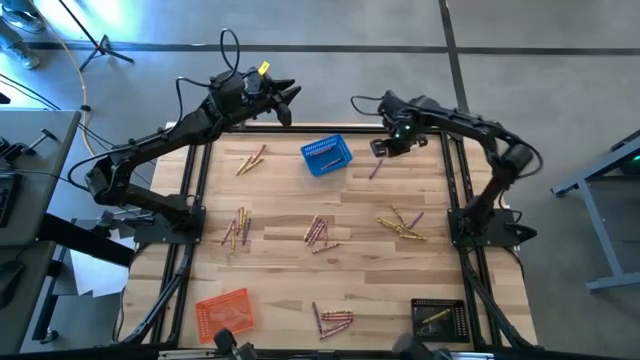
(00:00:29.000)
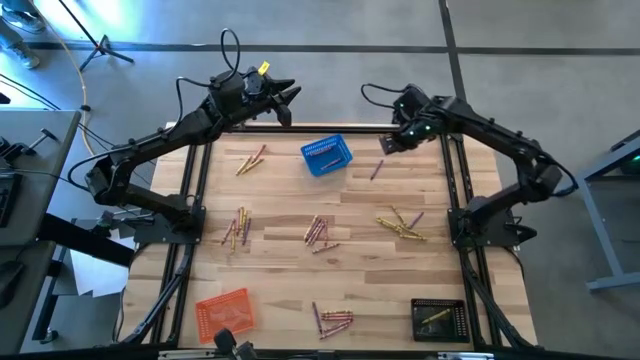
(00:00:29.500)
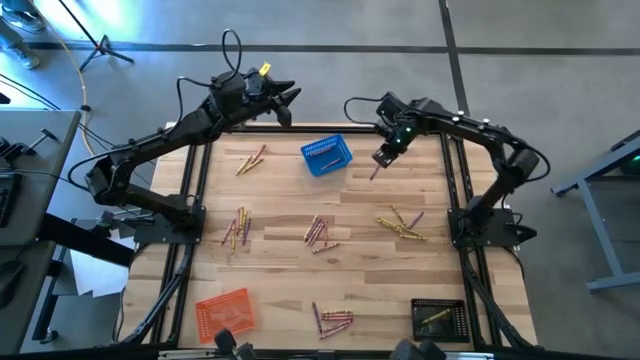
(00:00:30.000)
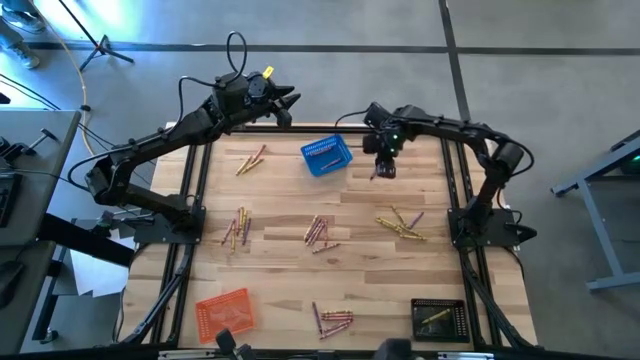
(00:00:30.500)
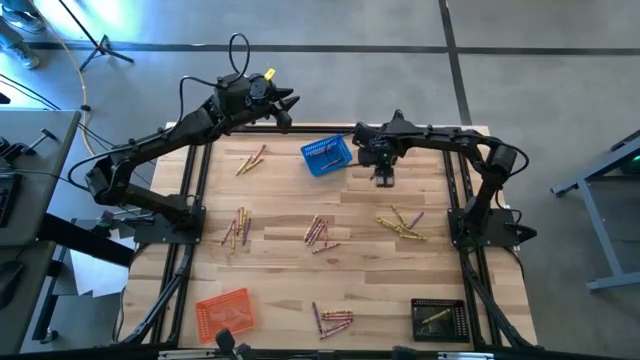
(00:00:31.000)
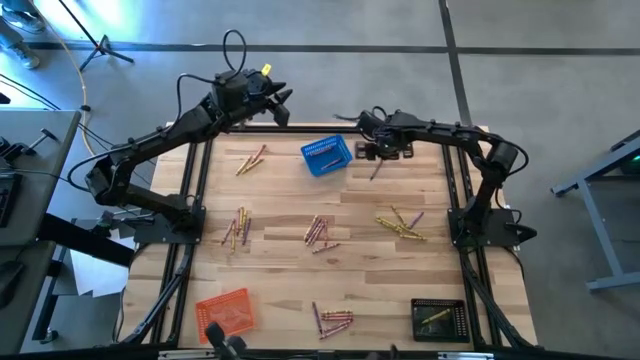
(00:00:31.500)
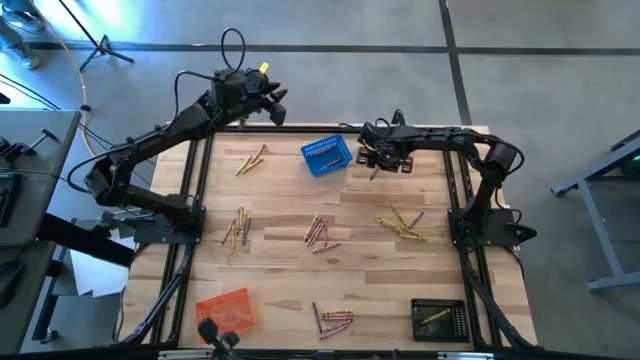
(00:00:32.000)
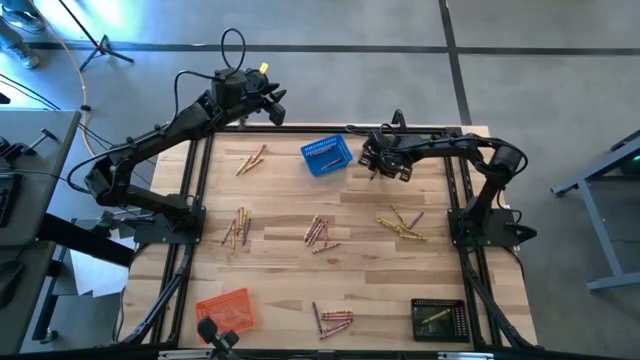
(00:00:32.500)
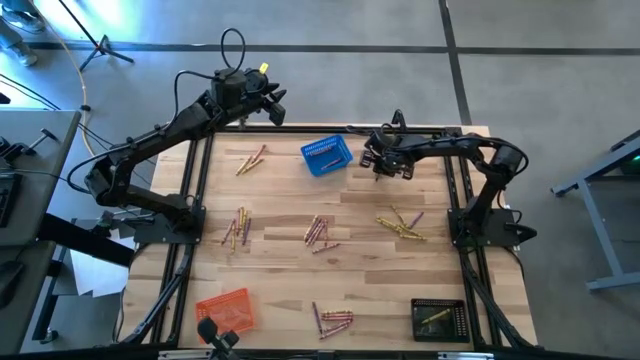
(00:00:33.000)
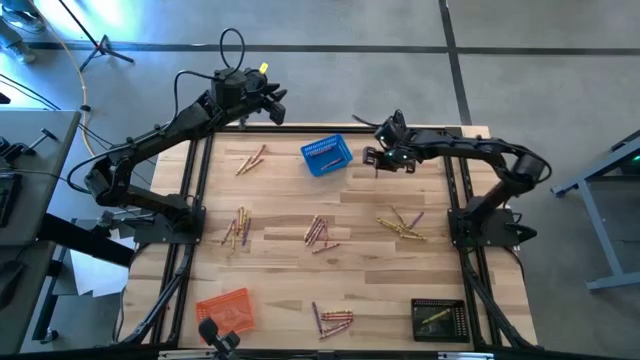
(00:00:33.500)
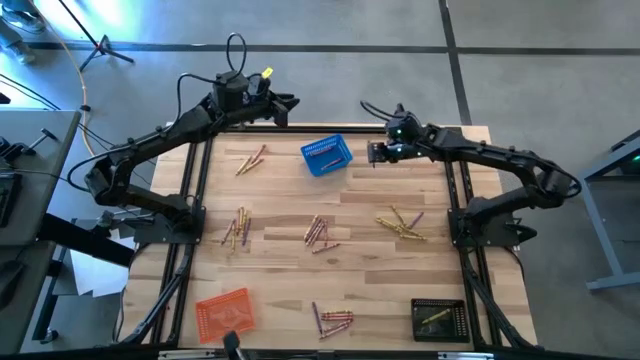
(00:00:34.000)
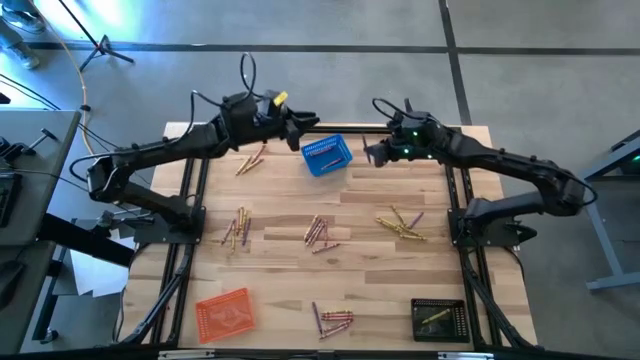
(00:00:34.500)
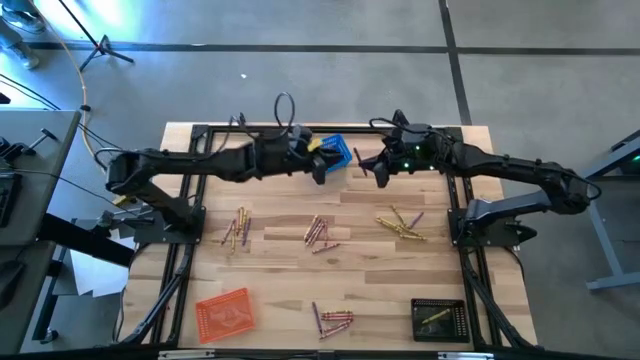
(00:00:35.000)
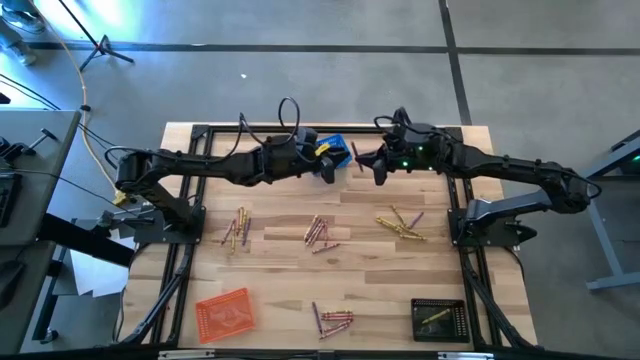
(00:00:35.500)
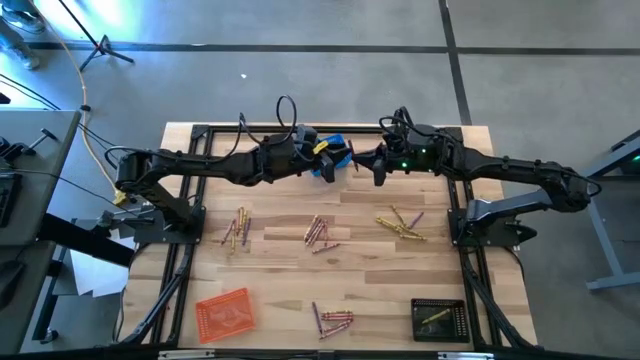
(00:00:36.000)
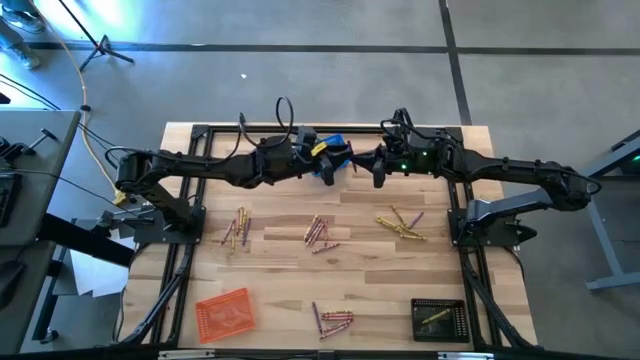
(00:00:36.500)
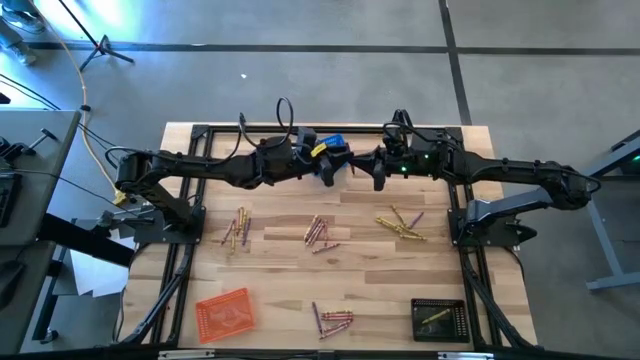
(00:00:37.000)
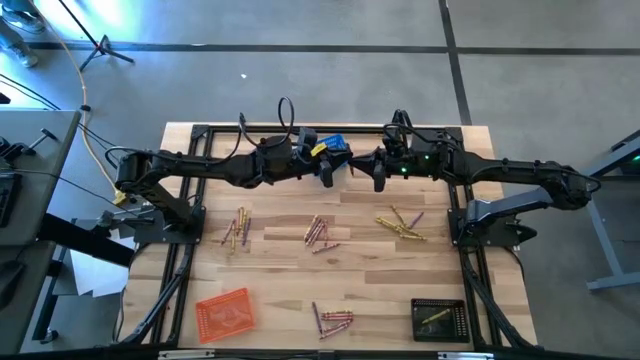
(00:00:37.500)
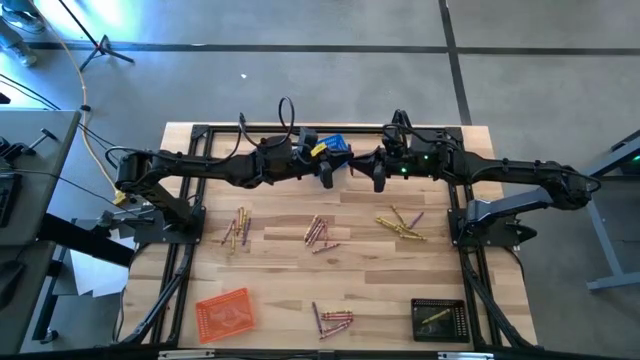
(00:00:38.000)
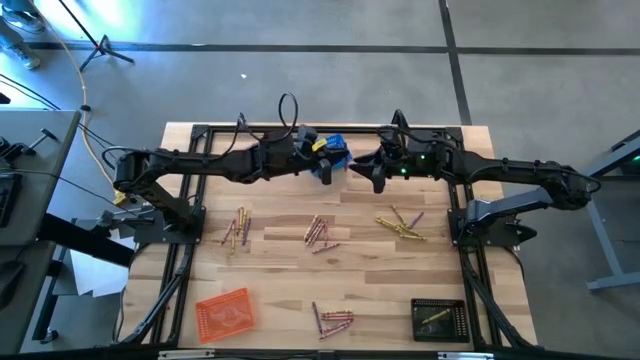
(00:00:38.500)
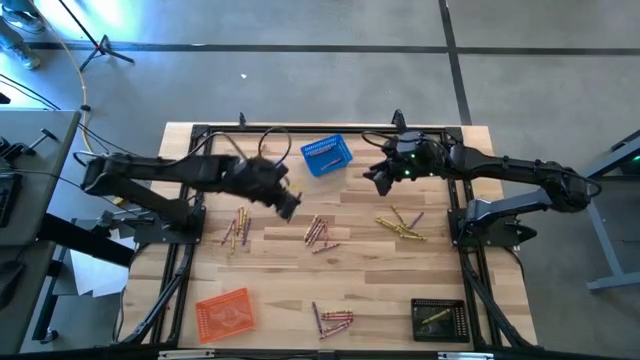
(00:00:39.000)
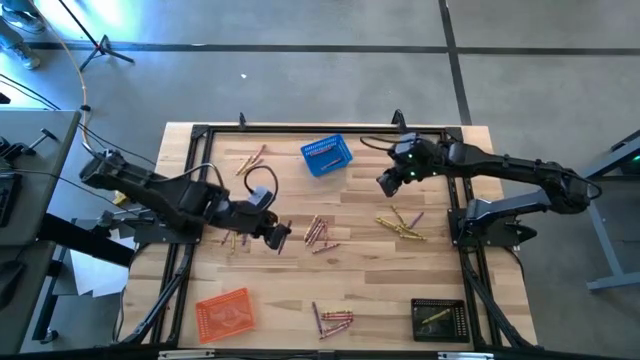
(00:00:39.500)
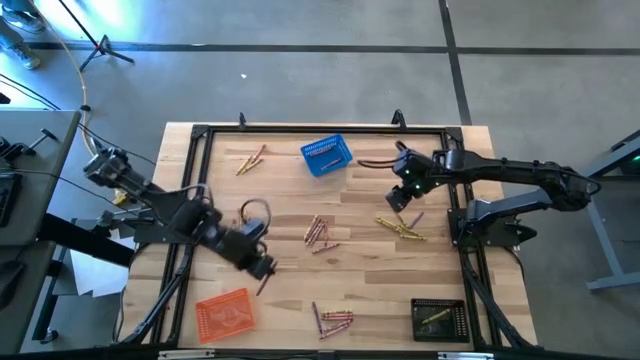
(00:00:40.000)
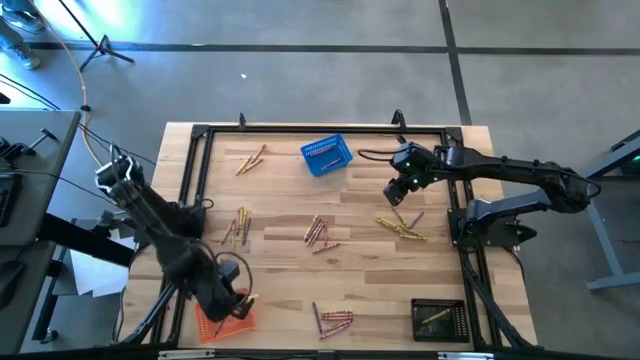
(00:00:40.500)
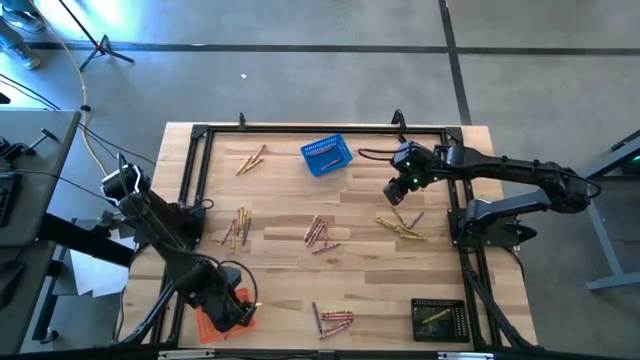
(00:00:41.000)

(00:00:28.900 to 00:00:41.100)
Task: Sort crayons
Put the purple crayon into the orange bin

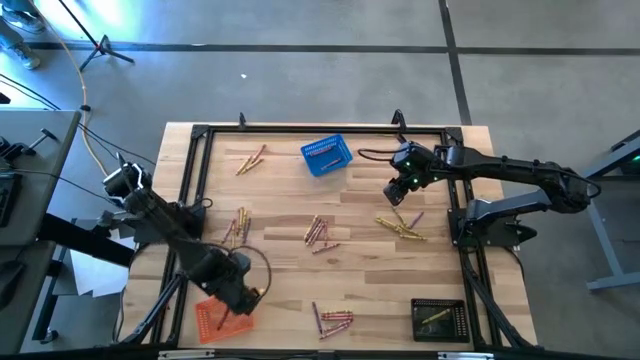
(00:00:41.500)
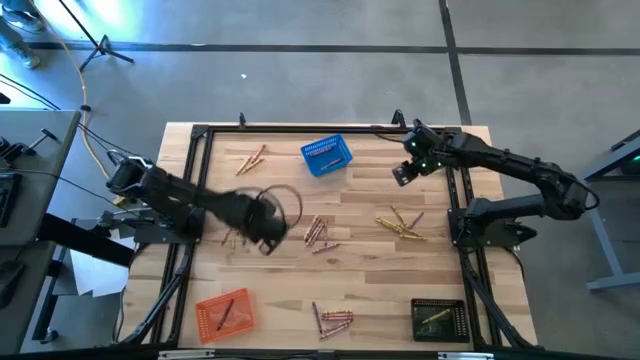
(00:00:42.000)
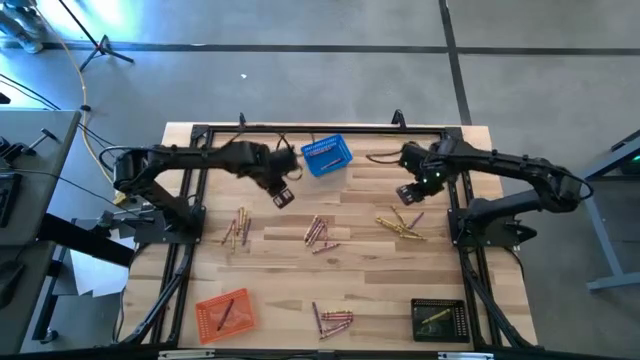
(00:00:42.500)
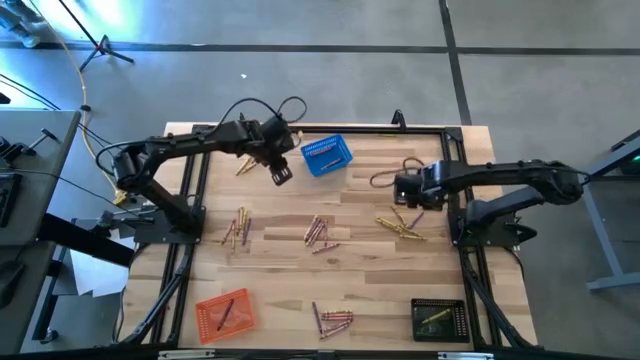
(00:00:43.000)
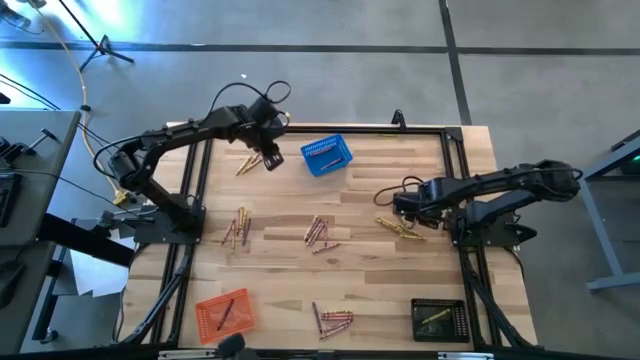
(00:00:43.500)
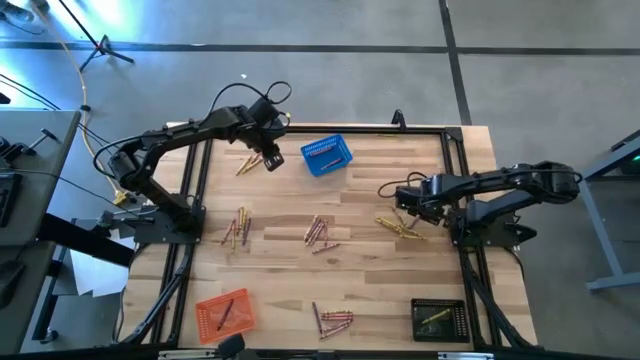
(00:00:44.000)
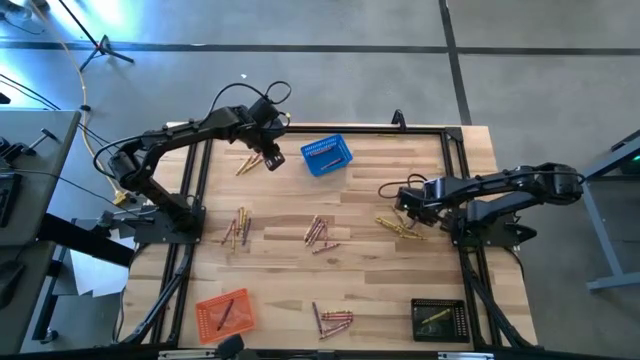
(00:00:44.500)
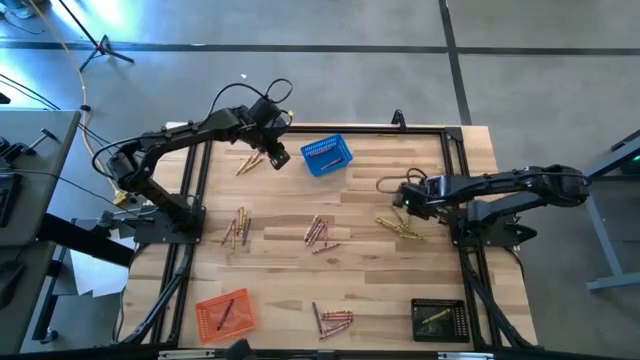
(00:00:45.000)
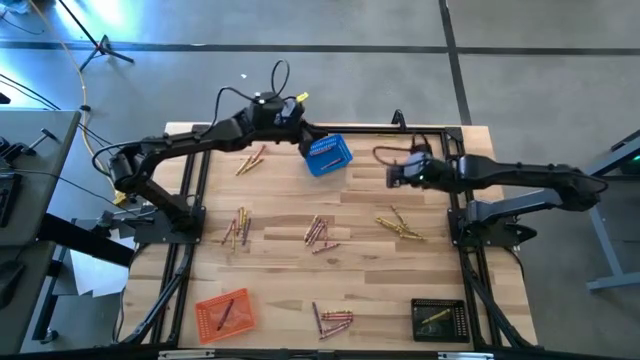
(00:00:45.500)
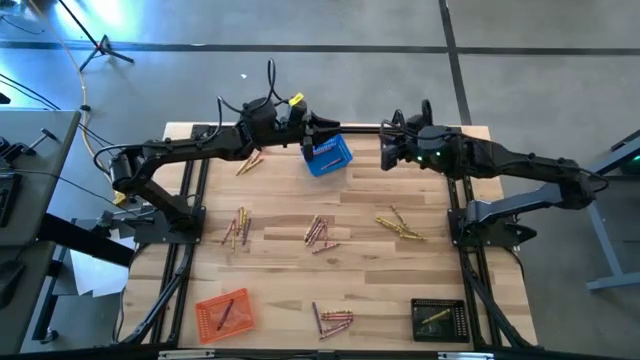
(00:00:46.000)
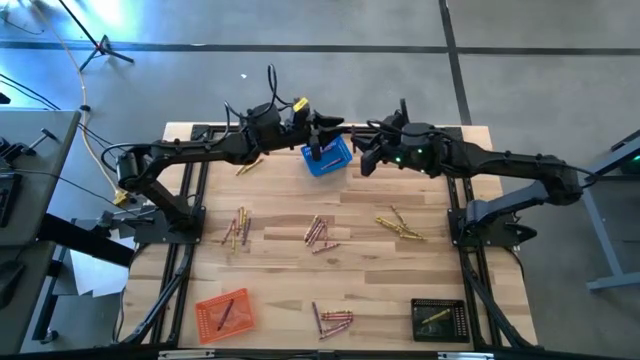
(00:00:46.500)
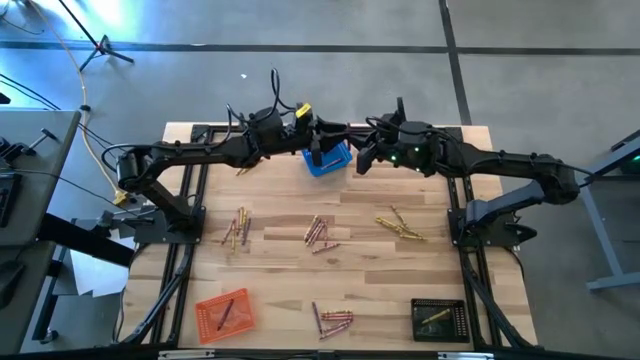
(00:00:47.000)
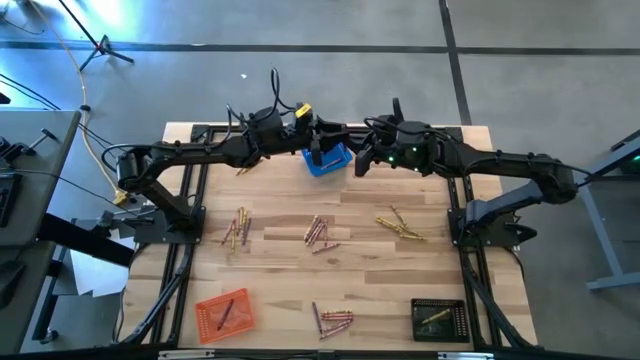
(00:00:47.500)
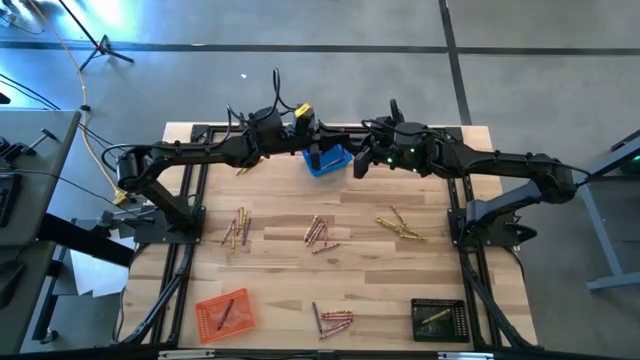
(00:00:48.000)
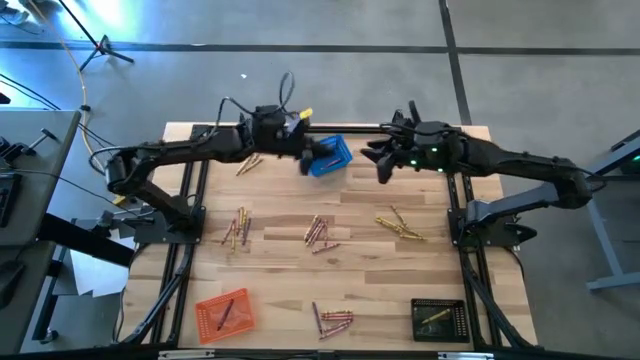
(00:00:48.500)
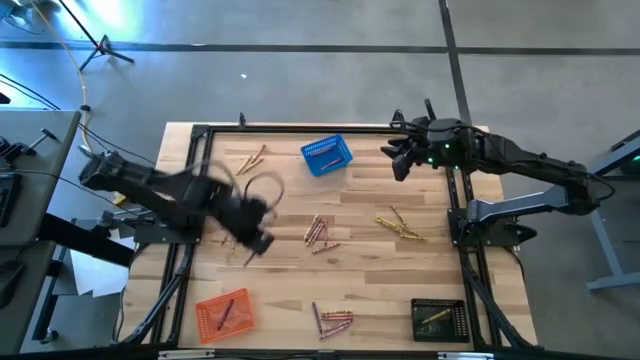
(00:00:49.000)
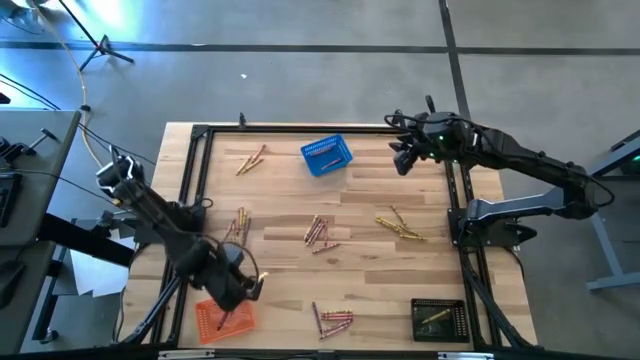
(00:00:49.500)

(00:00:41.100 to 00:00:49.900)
Put the purple crayon into the orange bin
